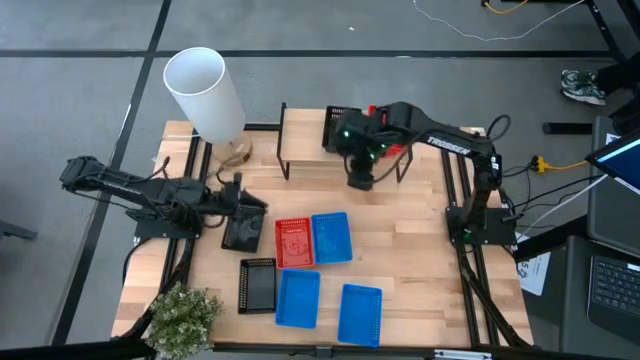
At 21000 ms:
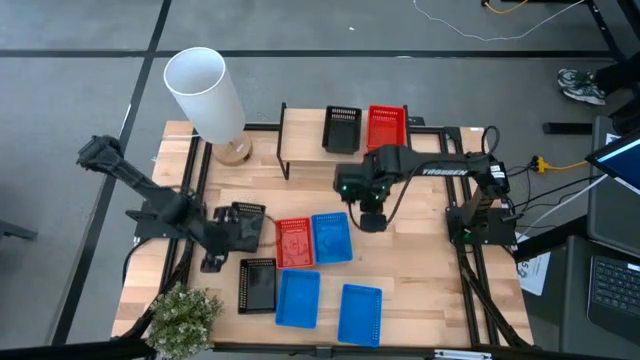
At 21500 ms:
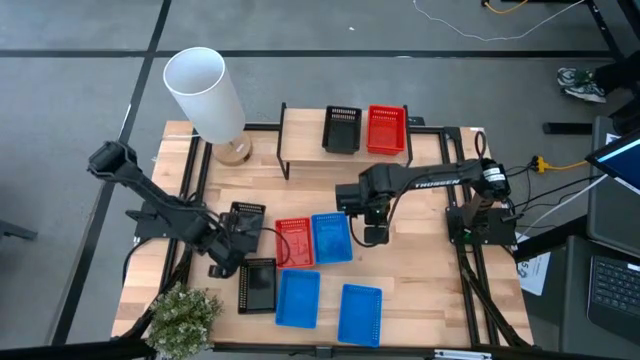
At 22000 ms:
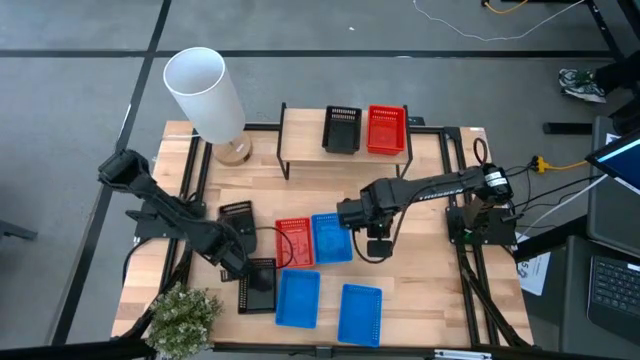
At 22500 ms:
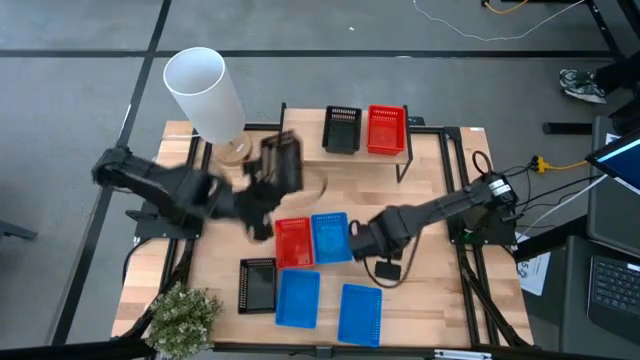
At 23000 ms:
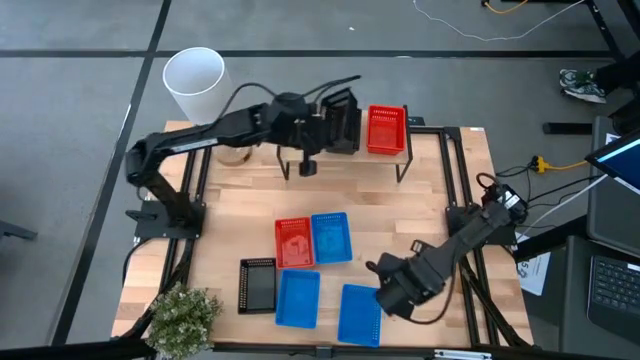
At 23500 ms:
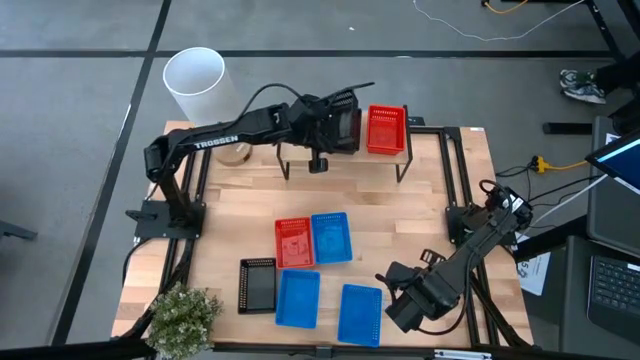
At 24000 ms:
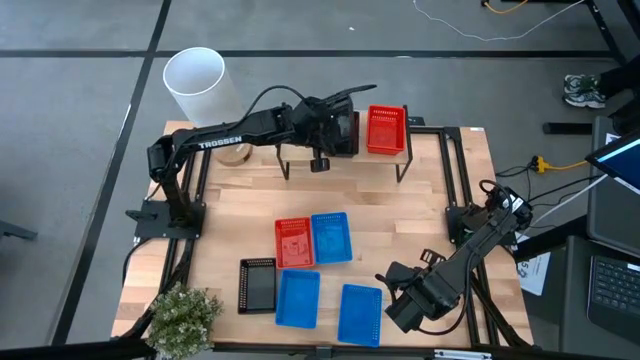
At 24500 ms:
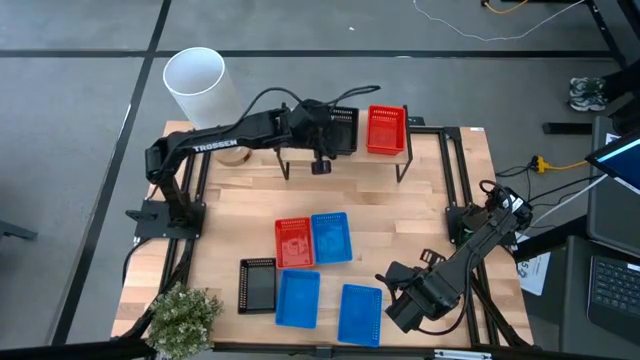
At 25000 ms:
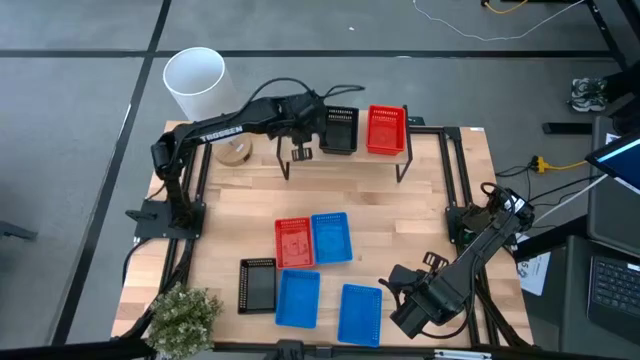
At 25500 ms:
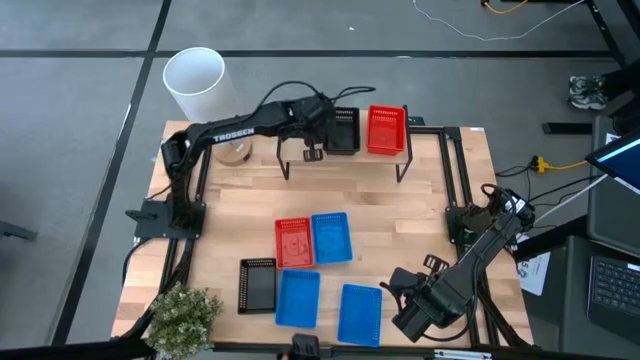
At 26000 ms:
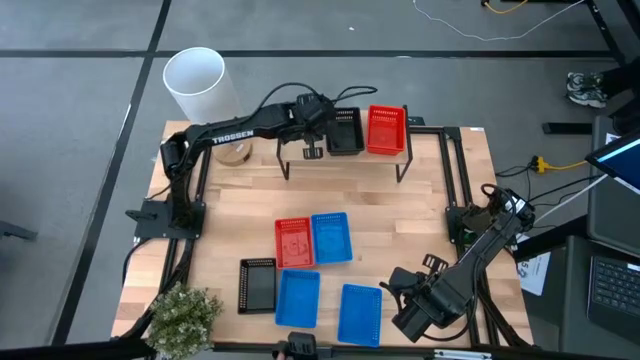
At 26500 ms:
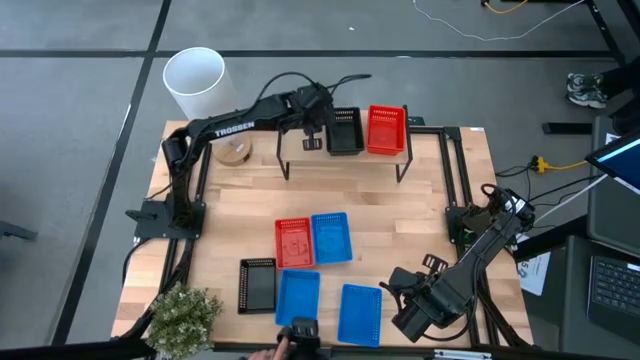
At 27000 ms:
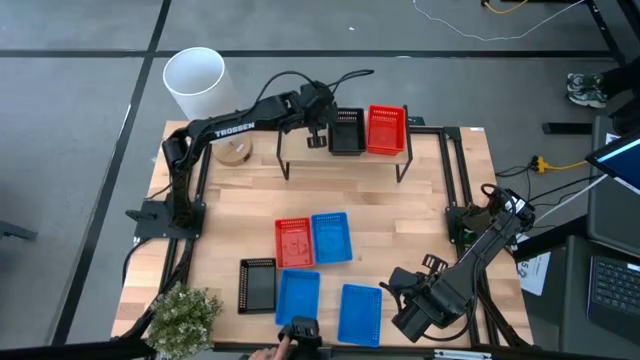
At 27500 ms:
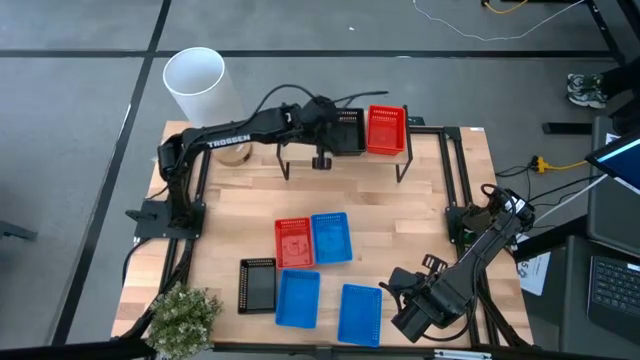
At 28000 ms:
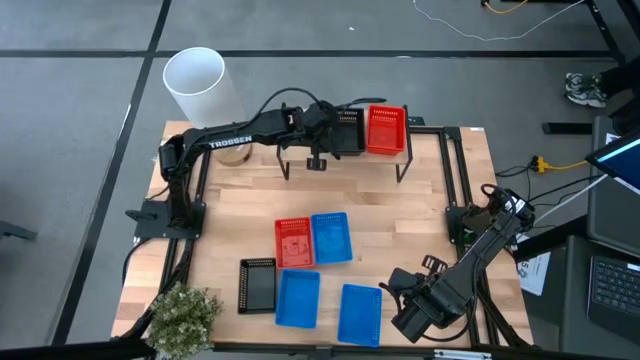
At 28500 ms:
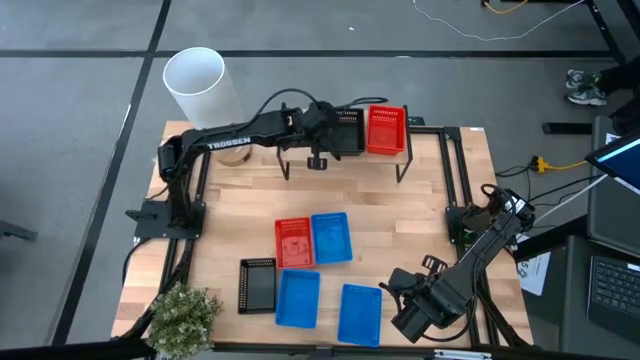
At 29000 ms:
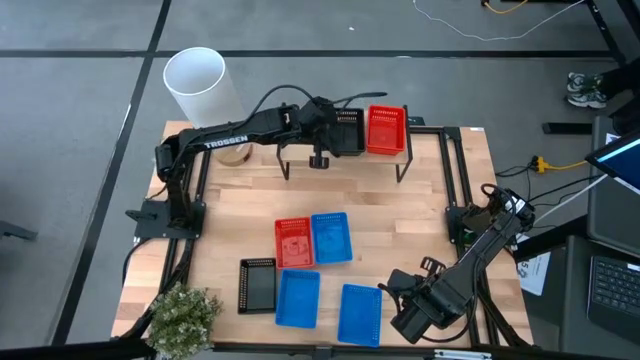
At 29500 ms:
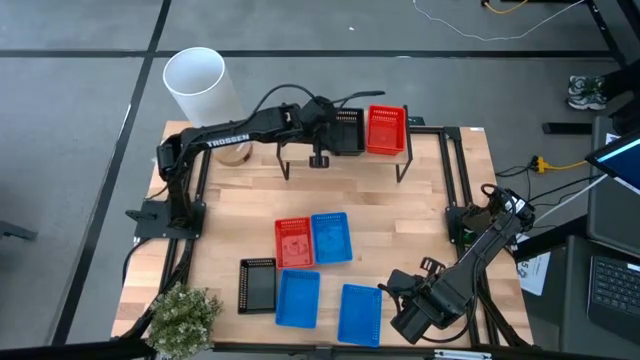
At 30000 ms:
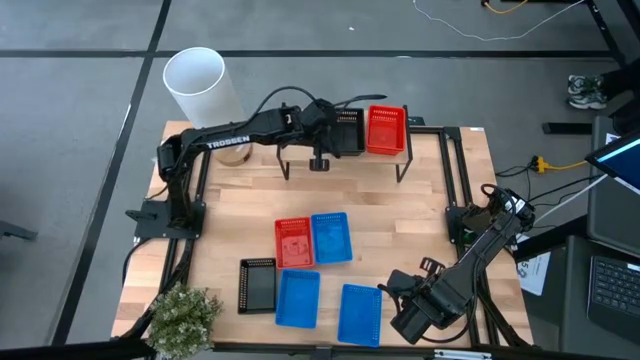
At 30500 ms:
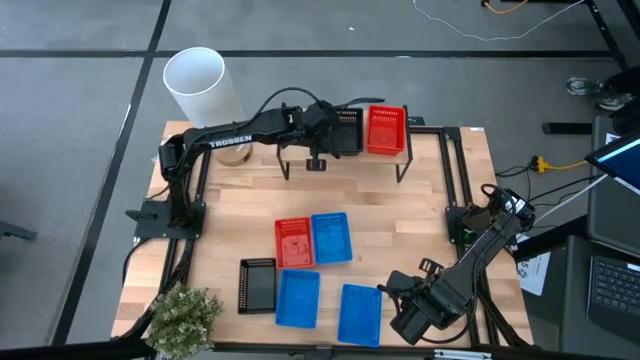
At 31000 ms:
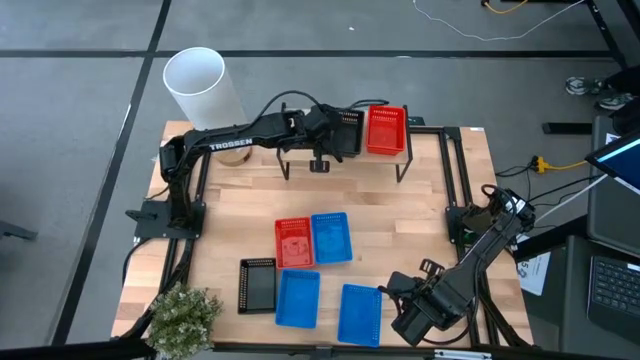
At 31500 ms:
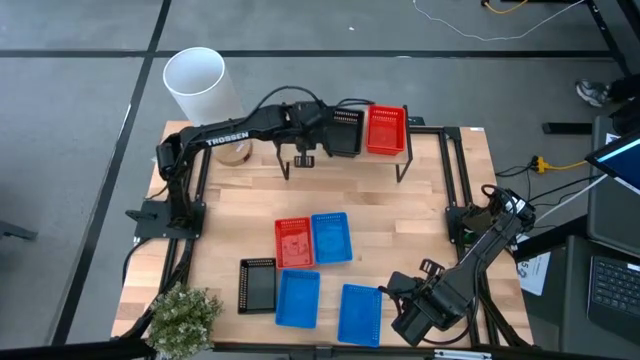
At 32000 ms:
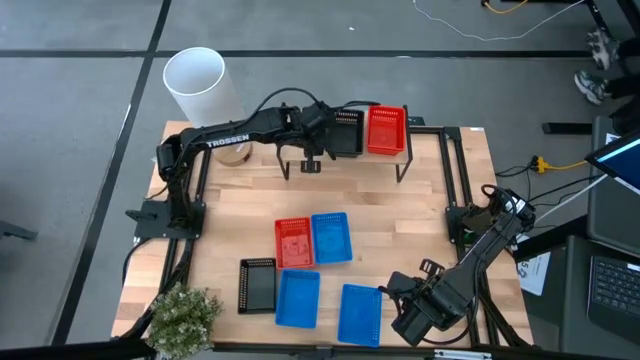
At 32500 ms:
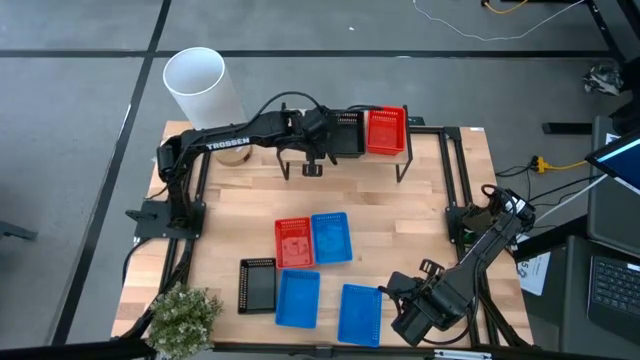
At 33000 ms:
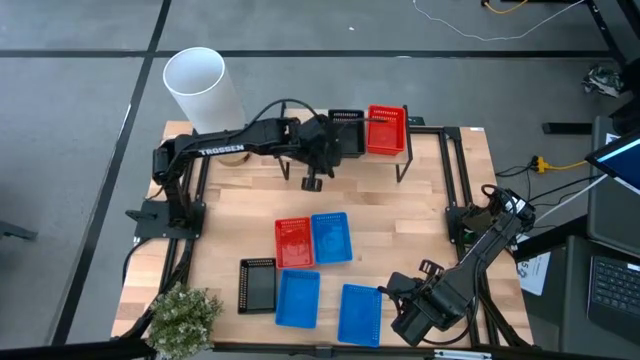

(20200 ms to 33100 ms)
Task: Stack baskets on shelf by color
Stack the top black bin on top of the other black bin on the shelf

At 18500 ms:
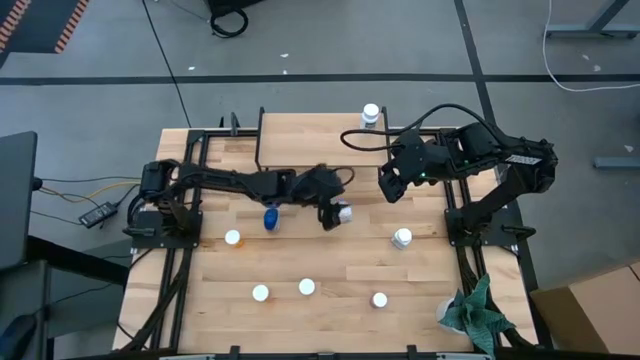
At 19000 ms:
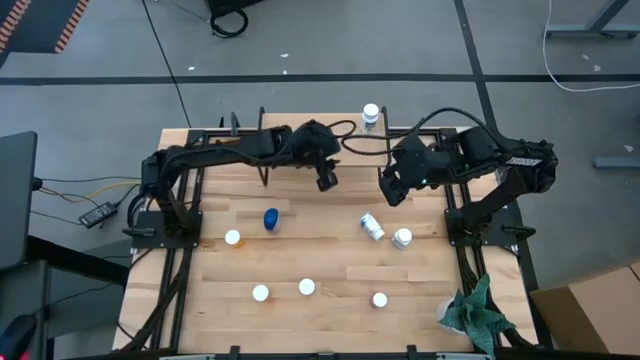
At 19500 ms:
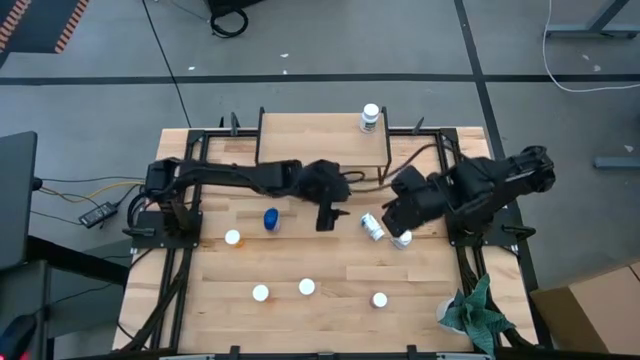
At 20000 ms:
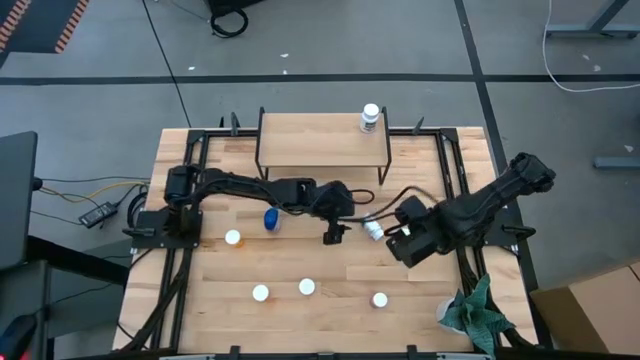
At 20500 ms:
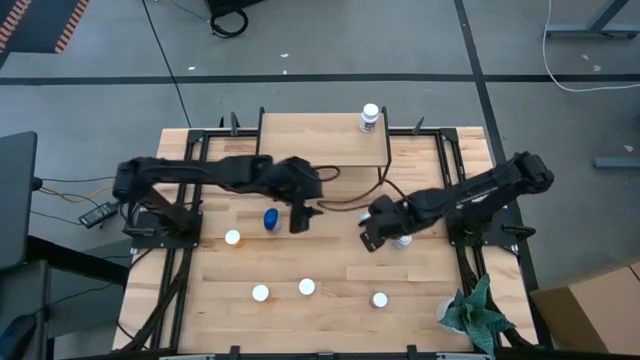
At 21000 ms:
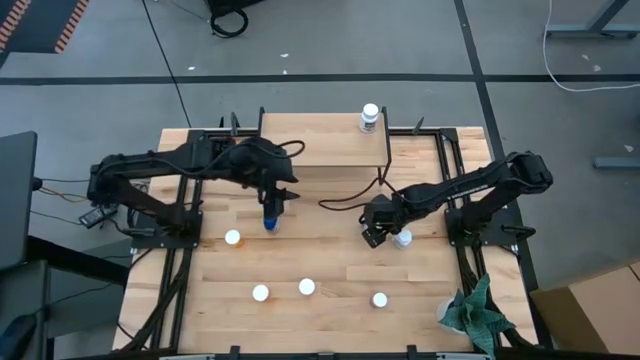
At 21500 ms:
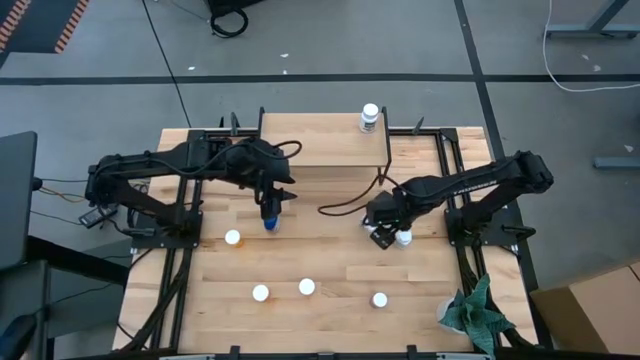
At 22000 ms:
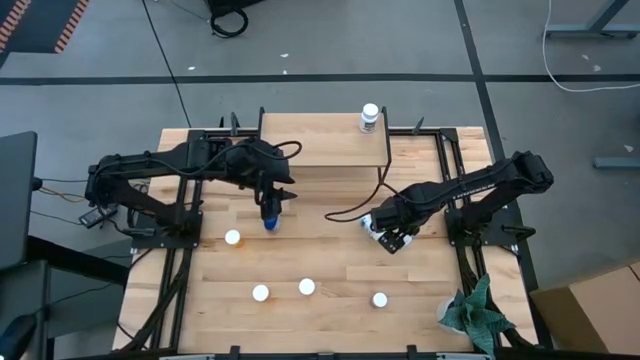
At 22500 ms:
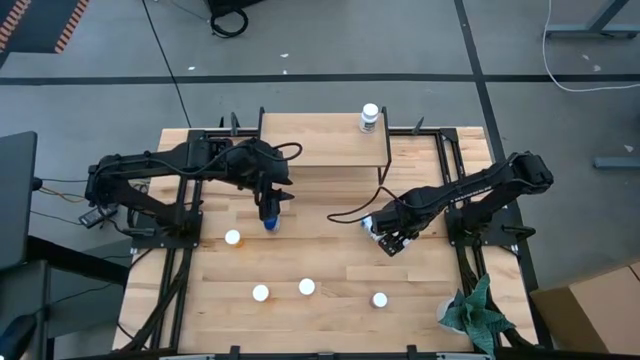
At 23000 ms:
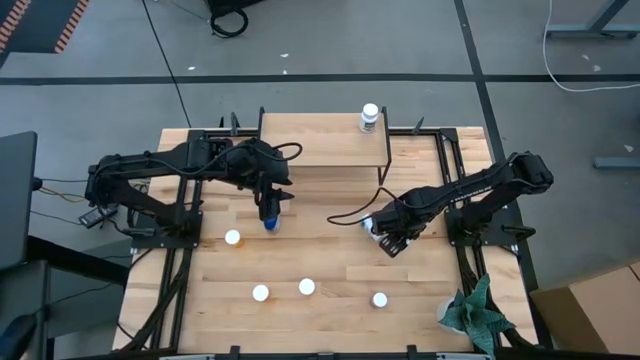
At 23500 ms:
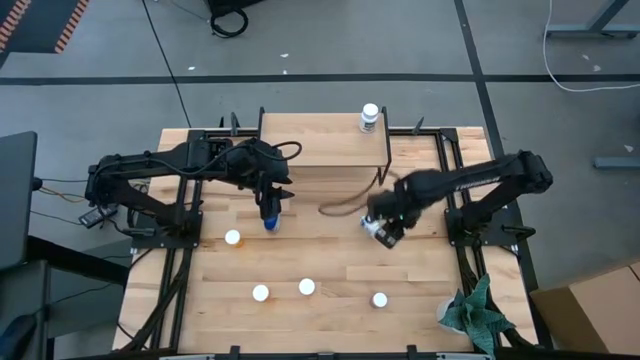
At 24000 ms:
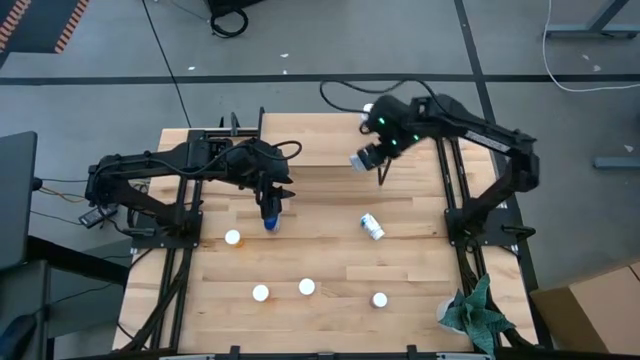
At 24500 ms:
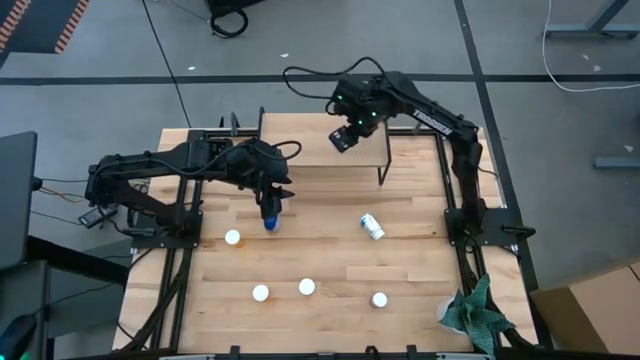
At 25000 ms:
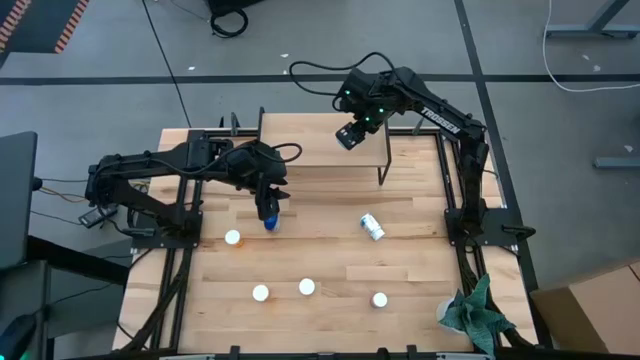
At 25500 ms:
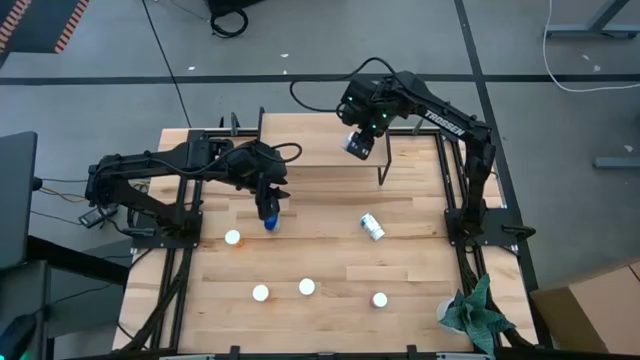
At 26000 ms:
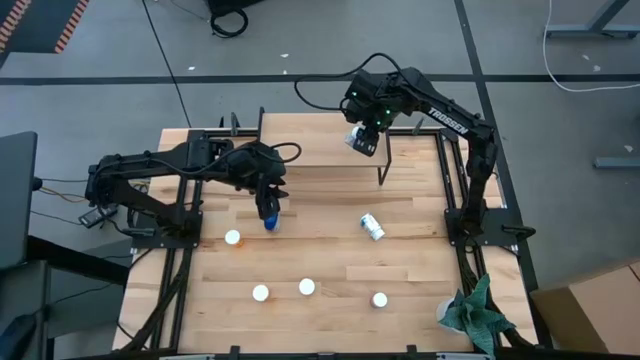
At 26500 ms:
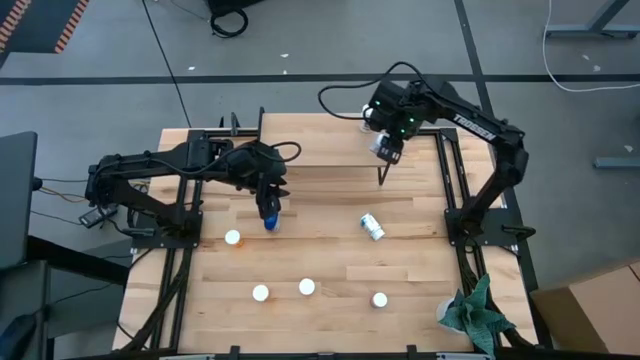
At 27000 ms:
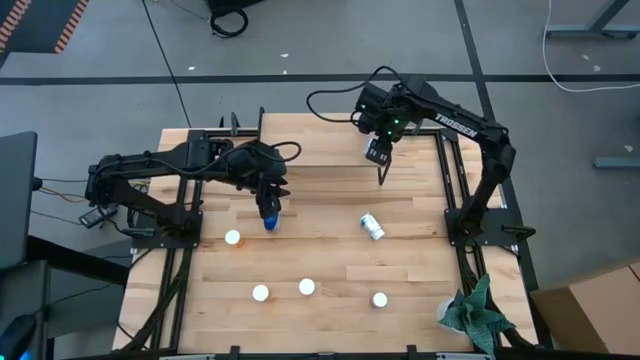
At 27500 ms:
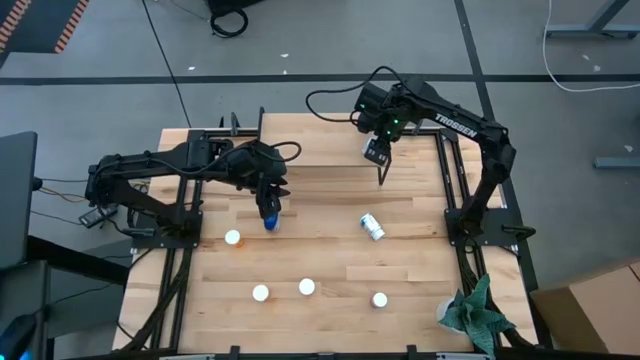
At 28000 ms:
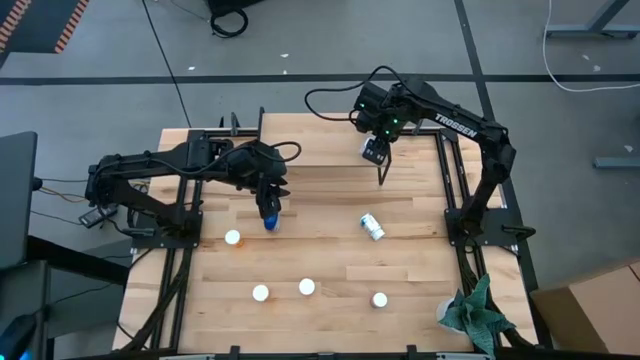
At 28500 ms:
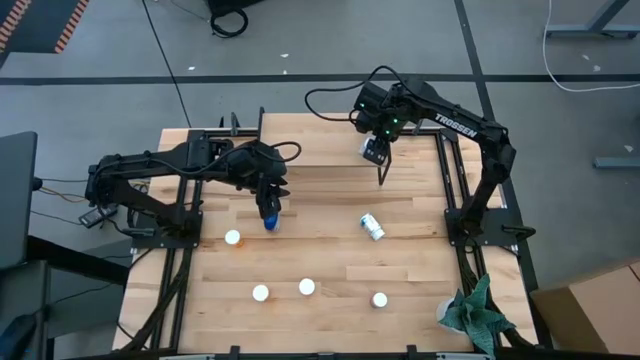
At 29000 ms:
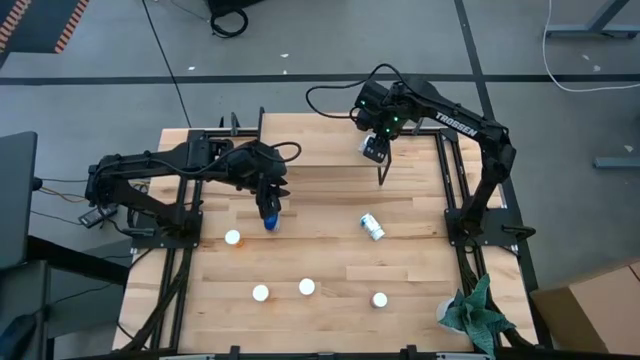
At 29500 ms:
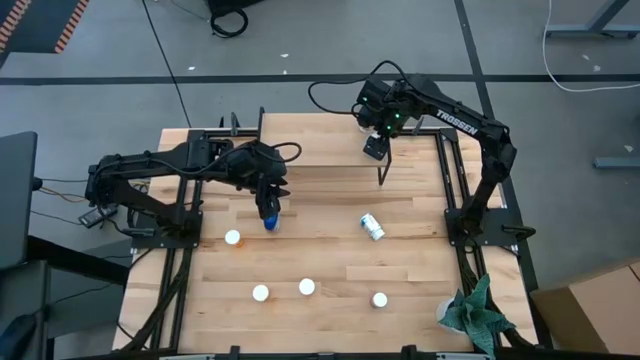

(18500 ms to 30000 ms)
Task: Pick and place medicine bottles onto shelf by color
Put the right white blue medicine bottle on the shelf
